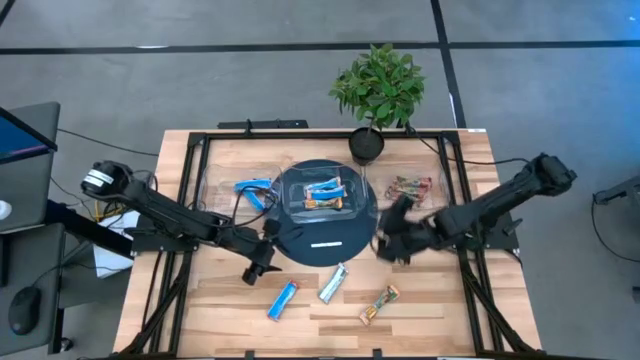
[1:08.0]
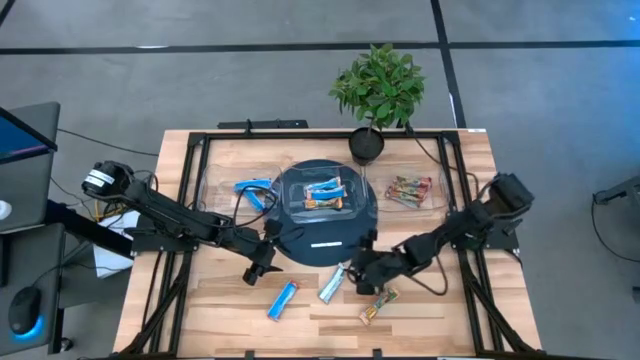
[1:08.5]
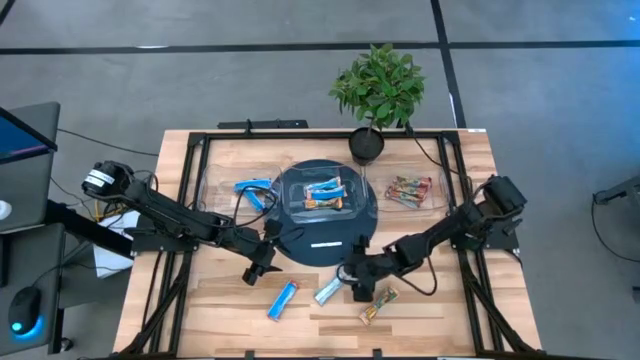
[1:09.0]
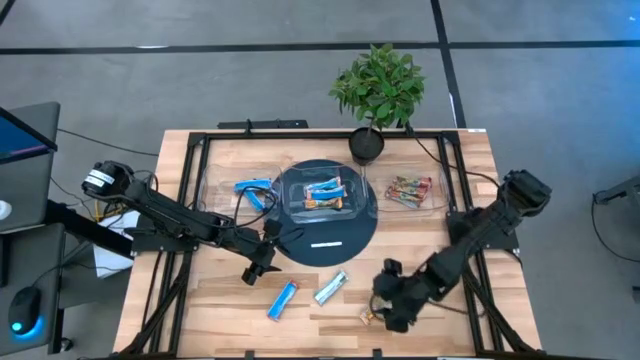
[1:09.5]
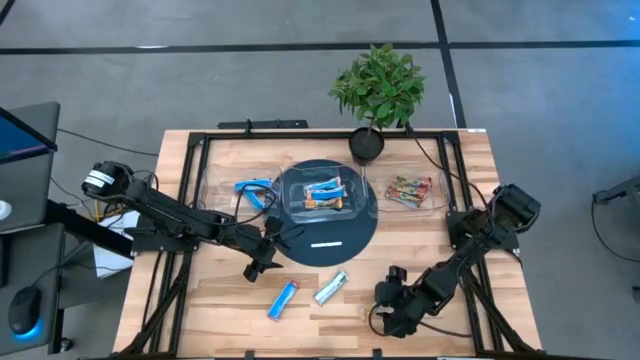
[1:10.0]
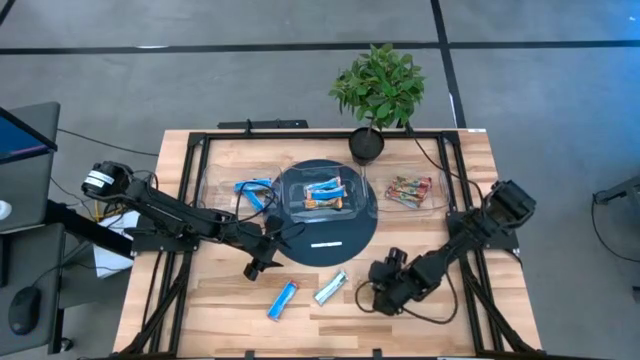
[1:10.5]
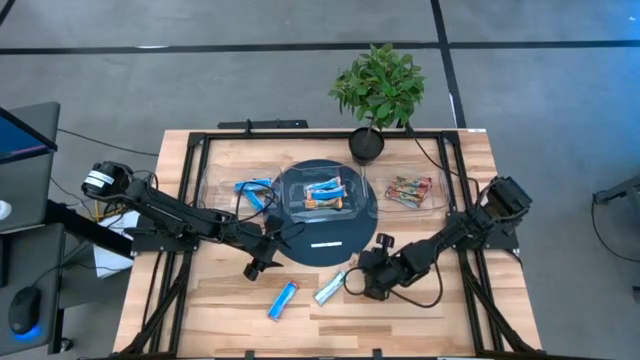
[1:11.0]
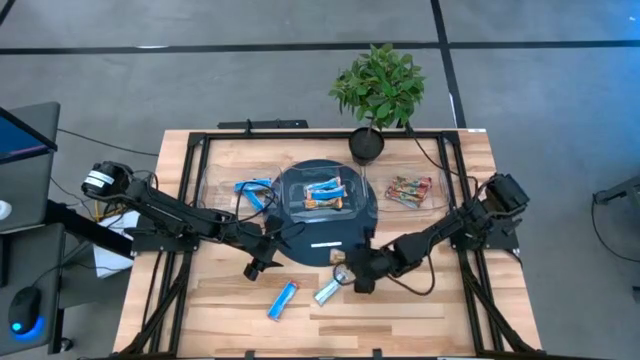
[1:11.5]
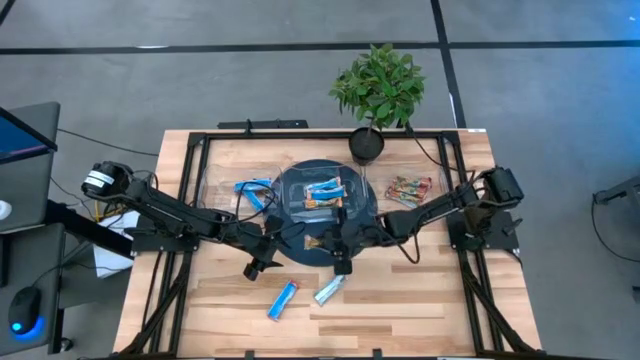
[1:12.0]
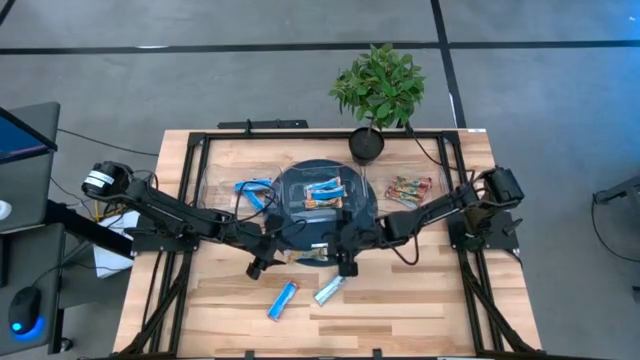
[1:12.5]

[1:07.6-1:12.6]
Task: Pick and place Granola Bars by type
Move the orange snack bar to the center of the table

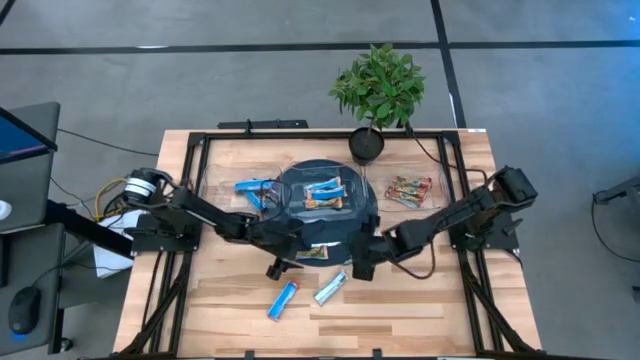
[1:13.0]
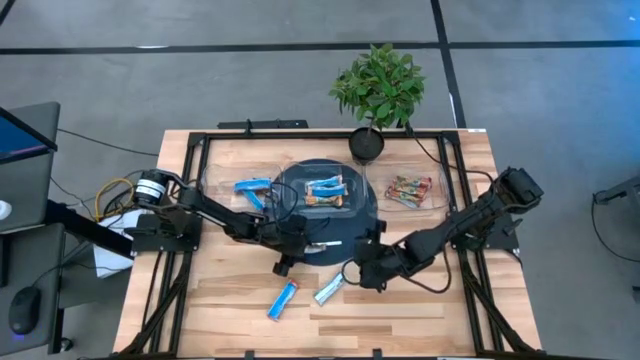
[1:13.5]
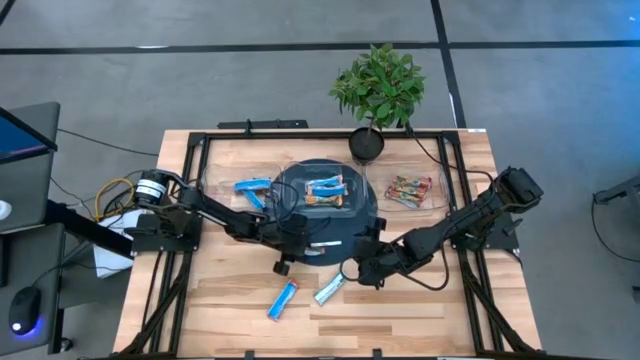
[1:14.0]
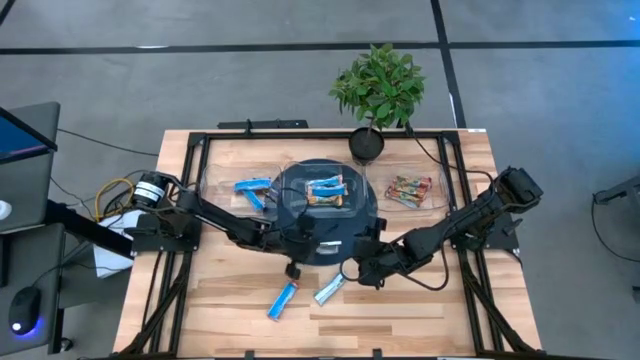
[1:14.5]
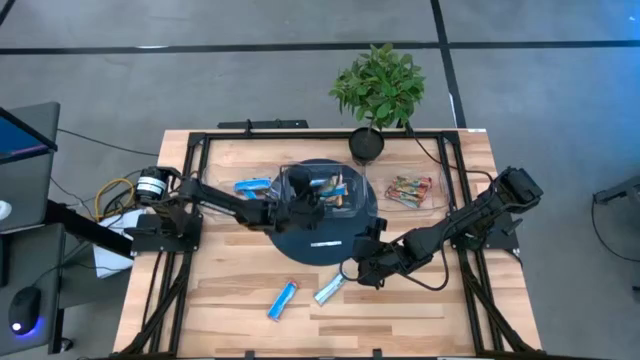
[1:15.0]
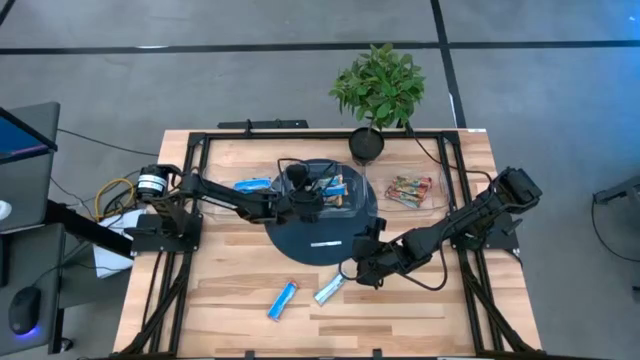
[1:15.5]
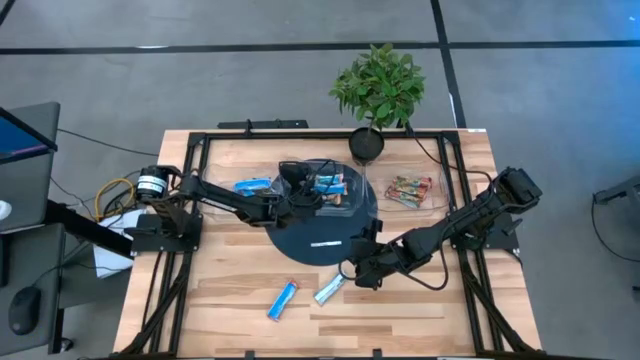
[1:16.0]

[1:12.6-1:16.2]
Put the orange snack bar into the middle transparent bin

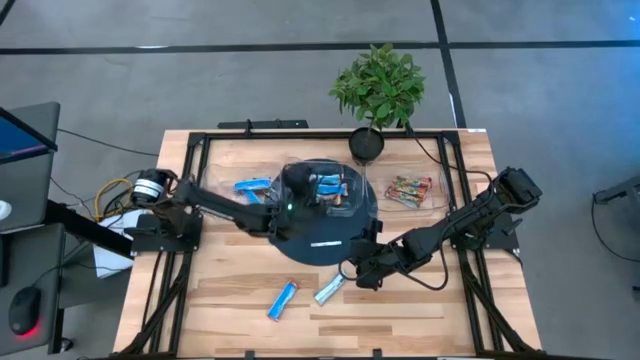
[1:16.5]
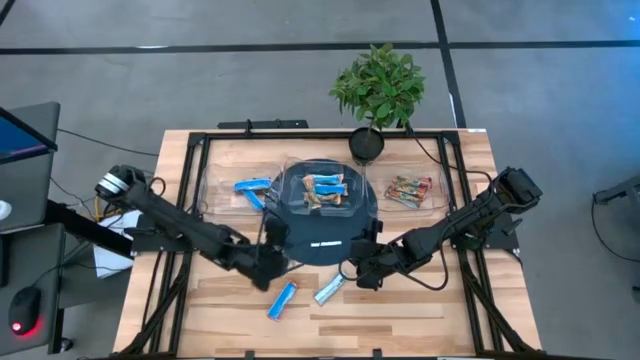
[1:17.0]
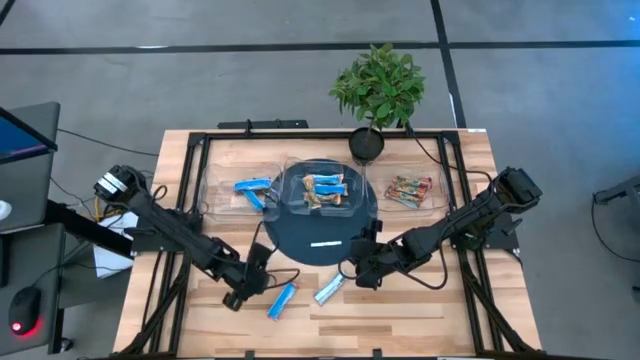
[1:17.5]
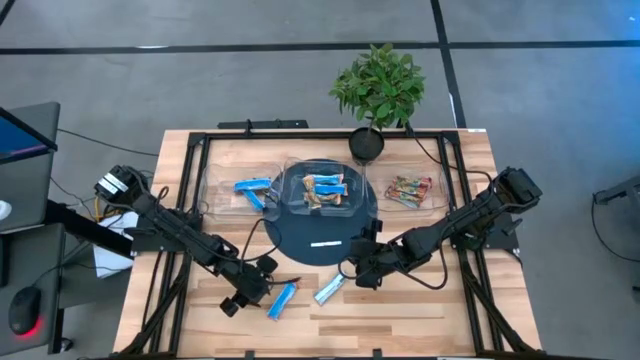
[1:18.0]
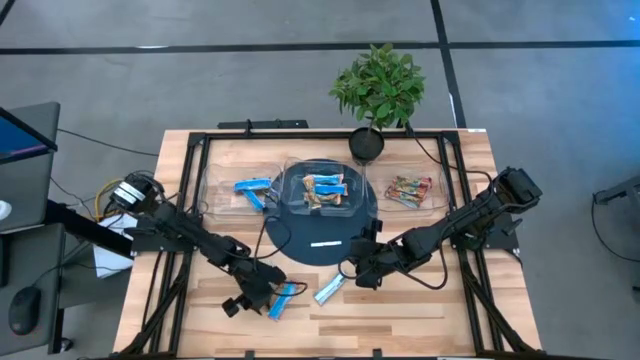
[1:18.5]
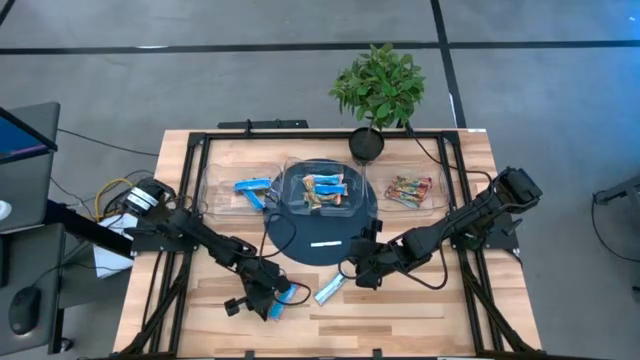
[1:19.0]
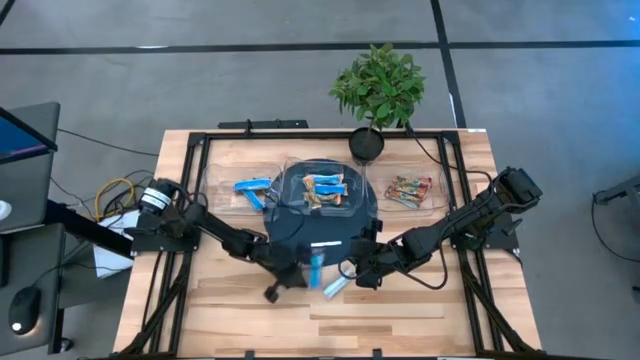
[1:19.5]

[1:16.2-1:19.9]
Move the red snack bar to the center of the table

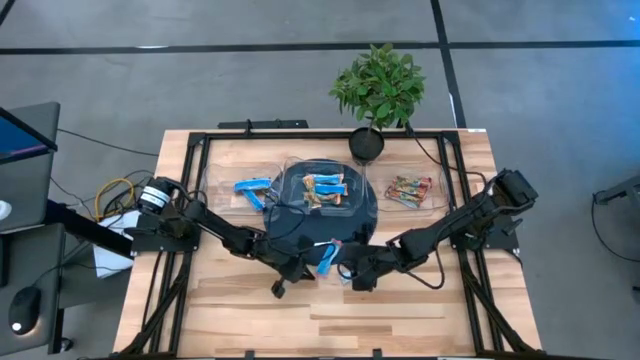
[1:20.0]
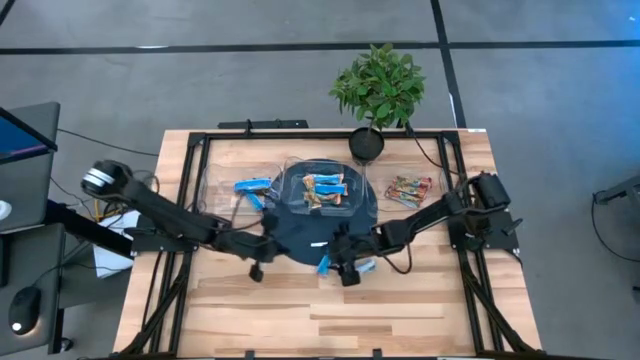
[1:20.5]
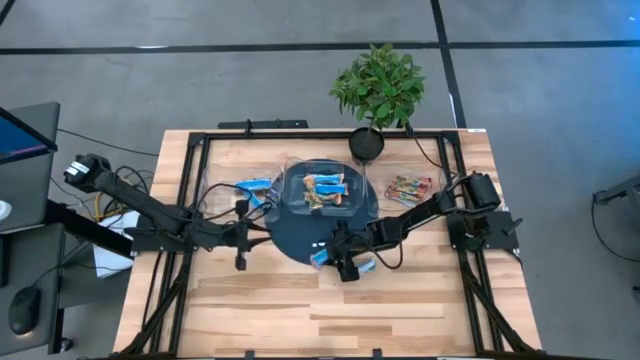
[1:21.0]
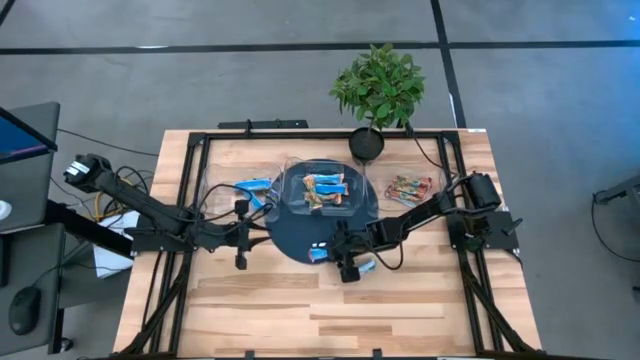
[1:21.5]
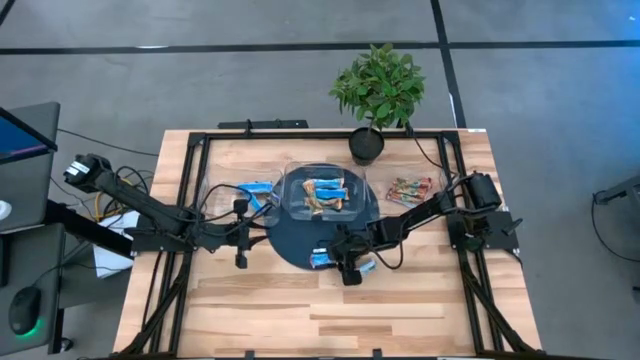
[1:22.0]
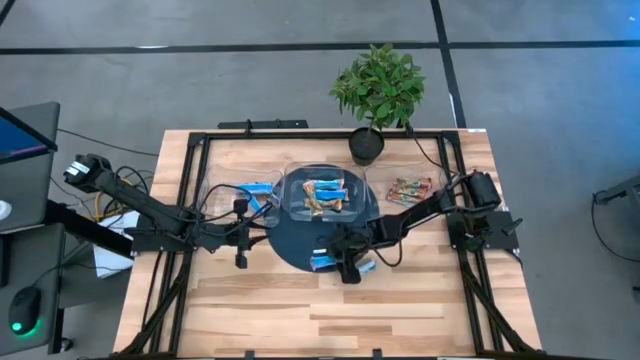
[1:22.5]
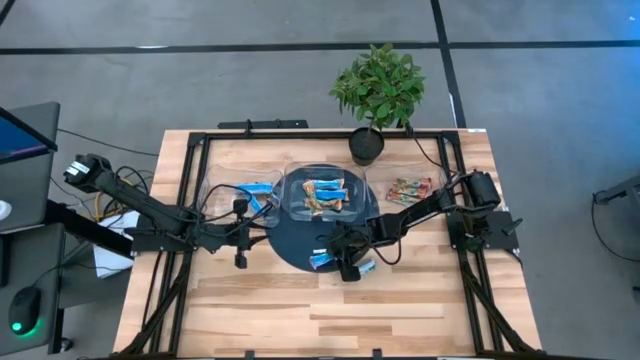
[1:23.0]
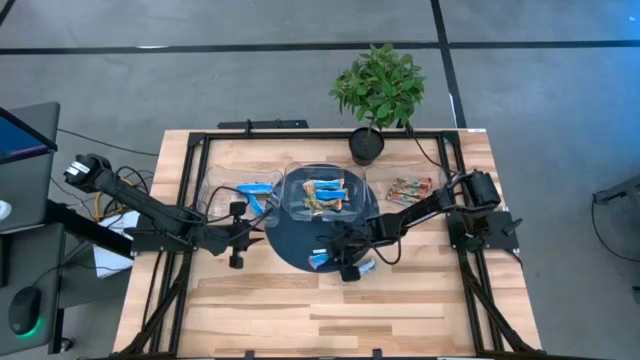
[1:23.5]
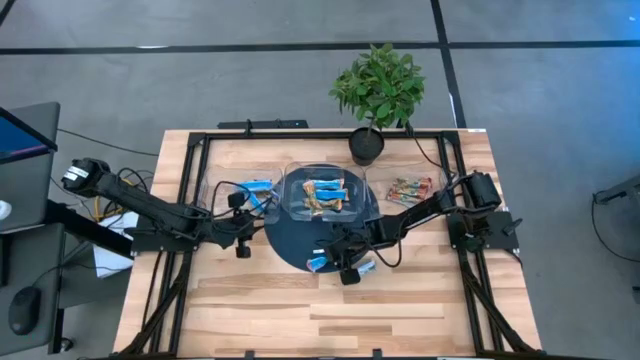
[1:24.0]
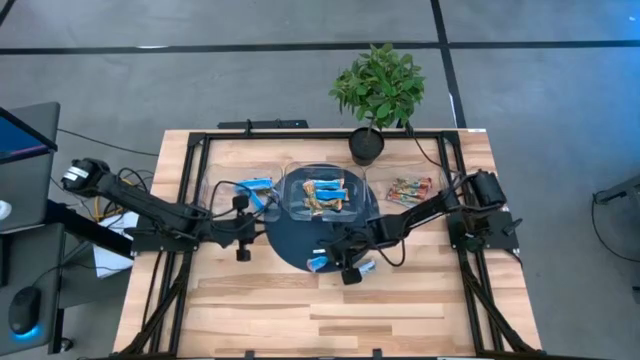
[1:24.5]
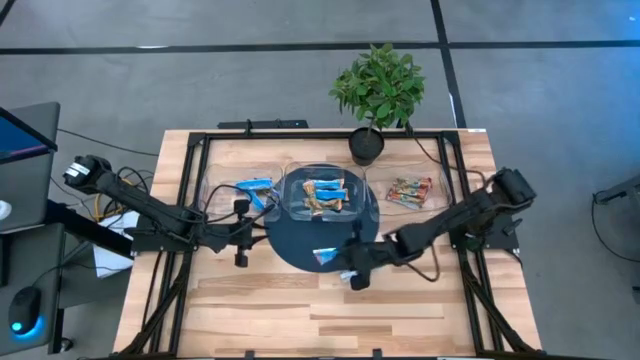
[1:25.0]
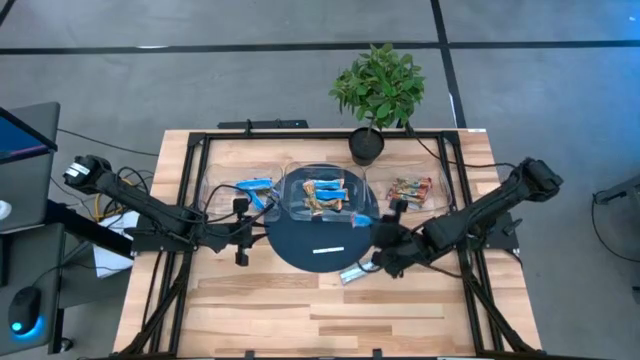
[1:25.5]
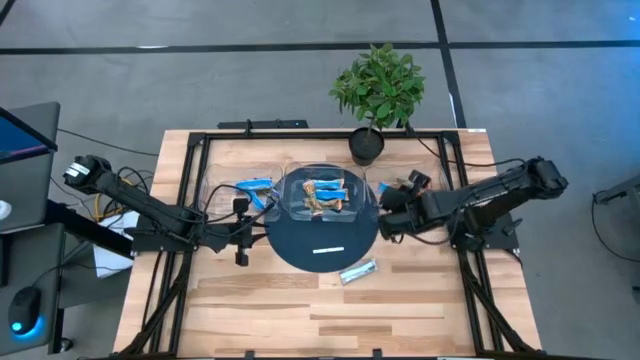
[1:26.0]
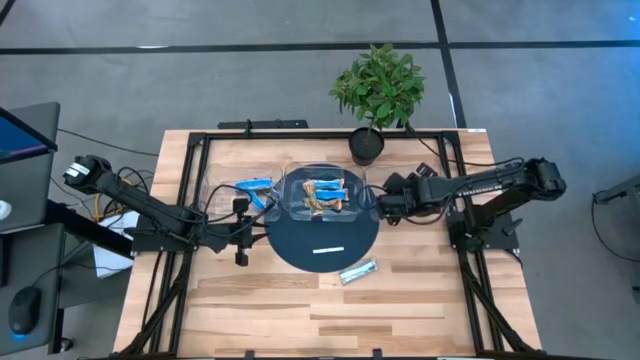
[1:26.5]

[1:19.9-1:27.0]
Put the red snack bar into the right transparent bin

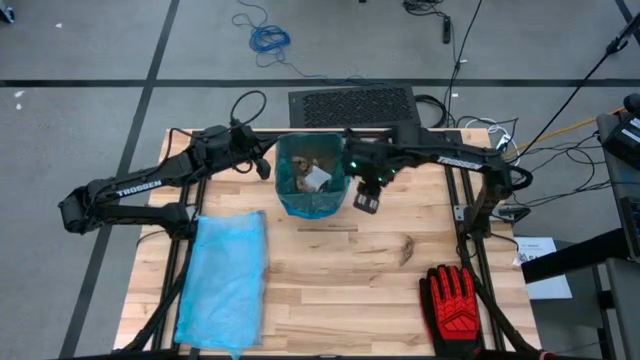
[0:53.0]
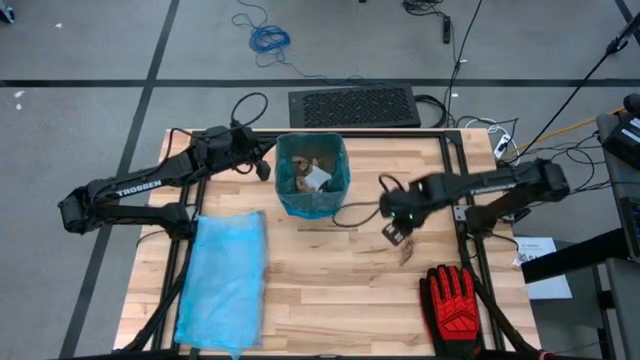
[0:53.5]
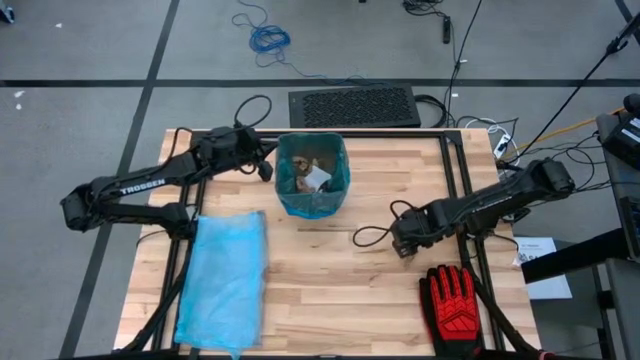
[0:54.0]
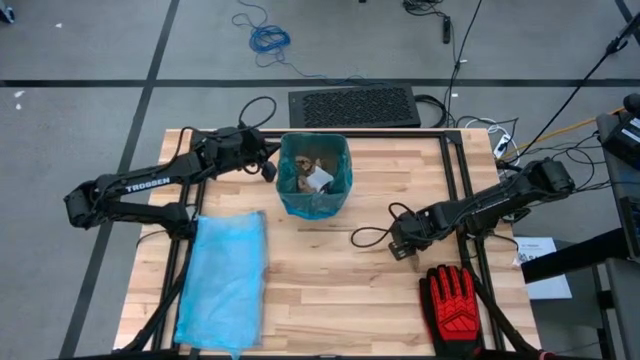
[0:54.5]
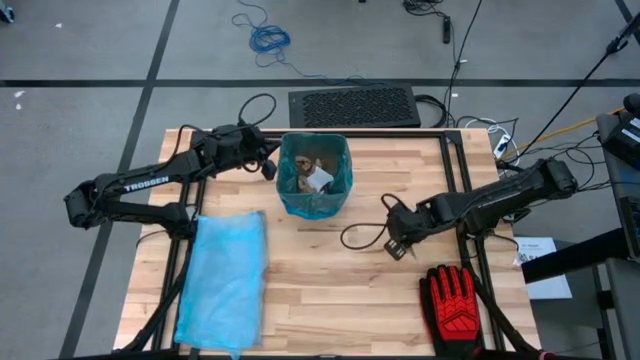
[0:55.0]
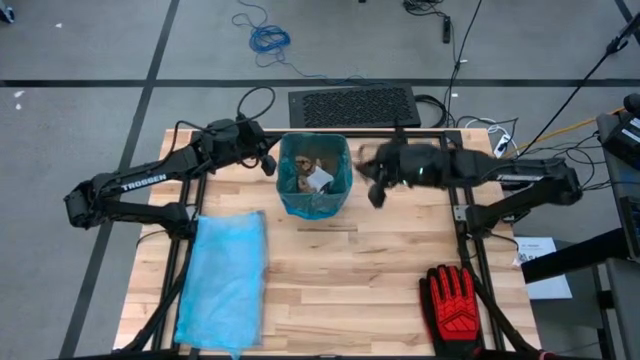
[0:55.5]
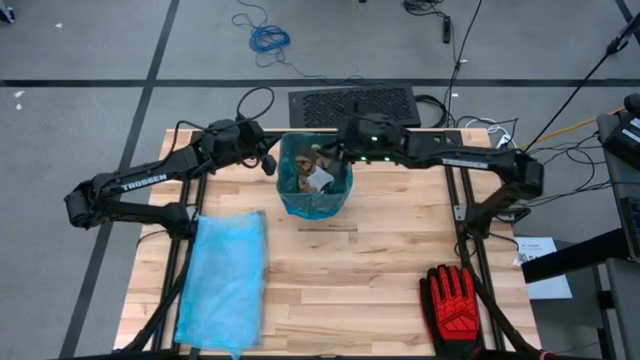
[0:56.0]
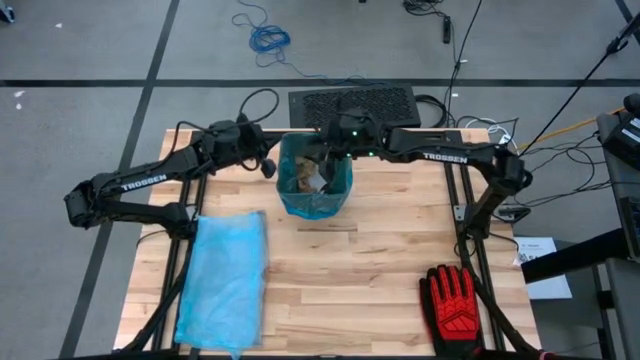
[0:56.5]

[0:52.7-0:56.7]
Task: place trash/remove bag and relplace
Put the brown napkin into the black trash bin
